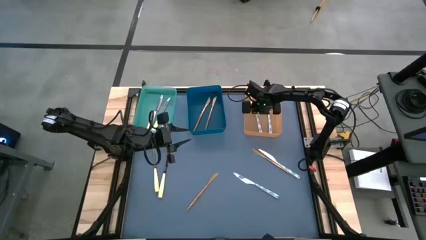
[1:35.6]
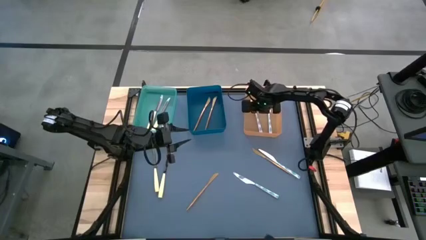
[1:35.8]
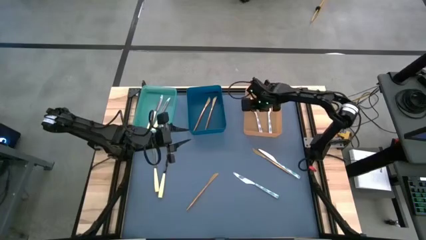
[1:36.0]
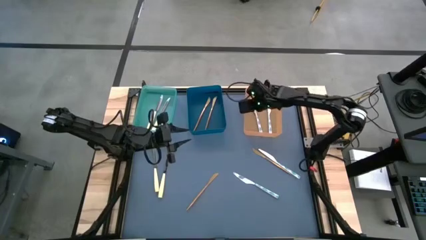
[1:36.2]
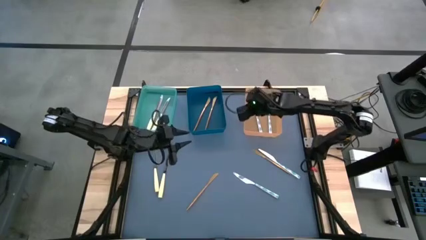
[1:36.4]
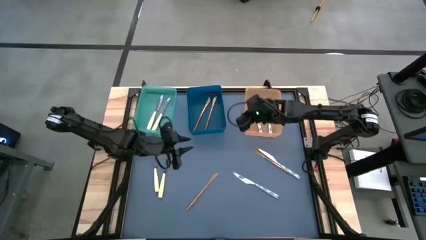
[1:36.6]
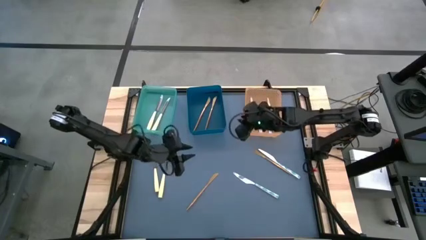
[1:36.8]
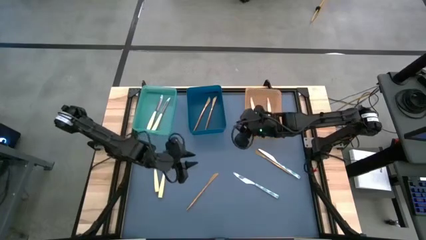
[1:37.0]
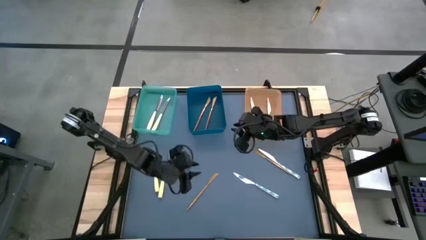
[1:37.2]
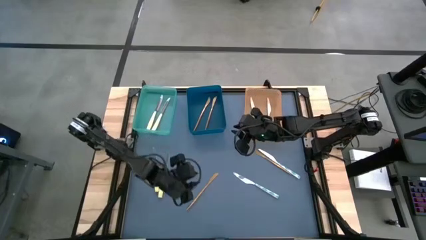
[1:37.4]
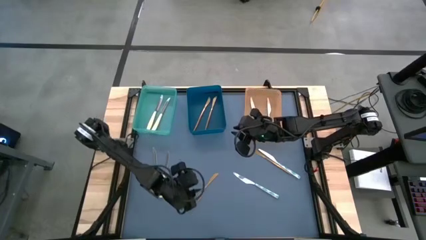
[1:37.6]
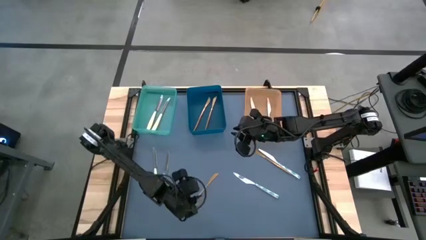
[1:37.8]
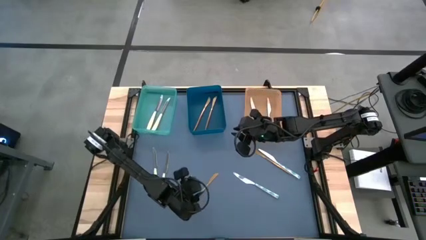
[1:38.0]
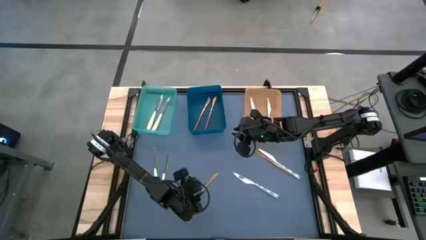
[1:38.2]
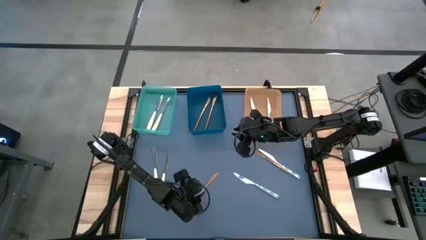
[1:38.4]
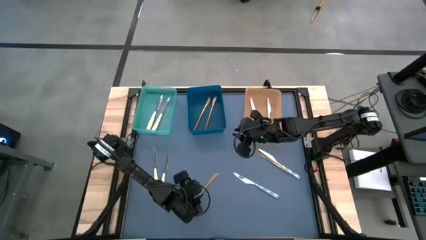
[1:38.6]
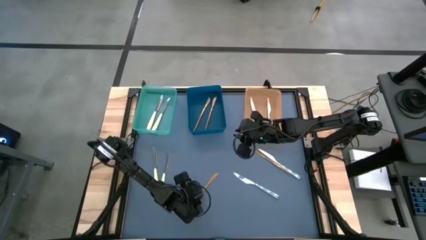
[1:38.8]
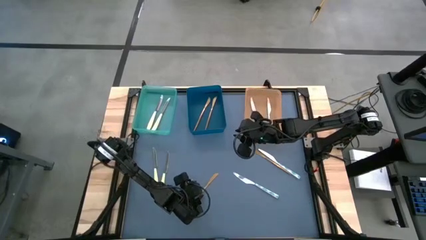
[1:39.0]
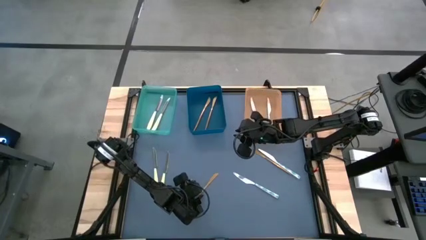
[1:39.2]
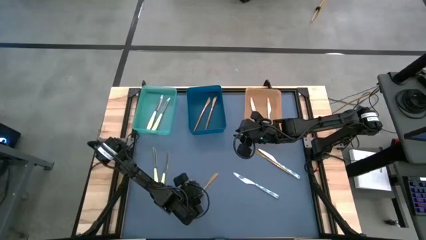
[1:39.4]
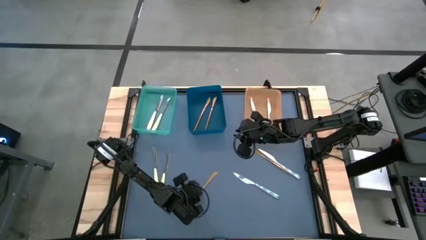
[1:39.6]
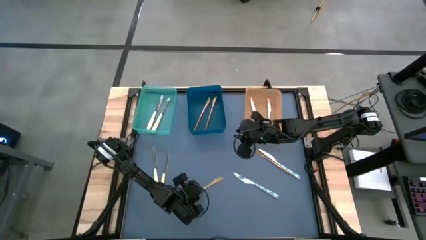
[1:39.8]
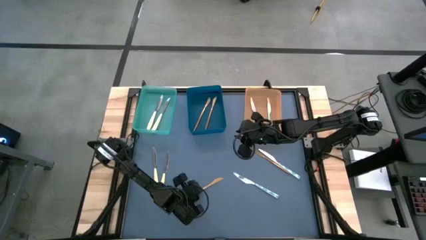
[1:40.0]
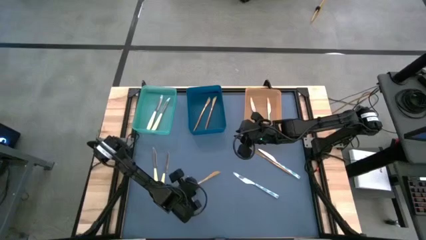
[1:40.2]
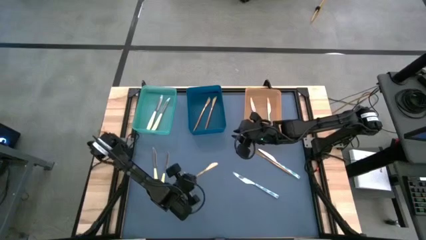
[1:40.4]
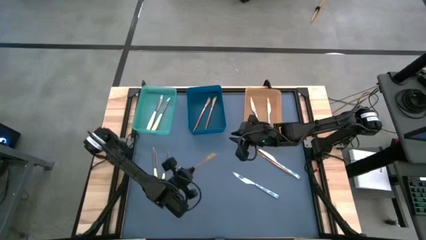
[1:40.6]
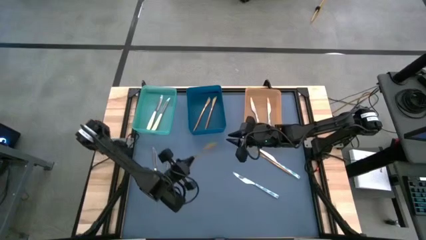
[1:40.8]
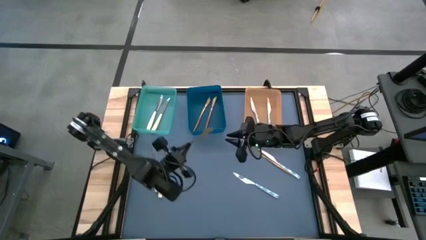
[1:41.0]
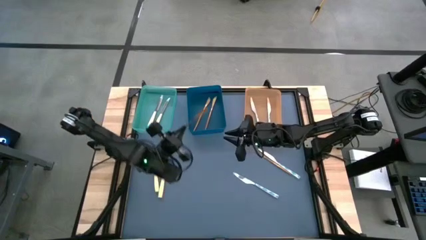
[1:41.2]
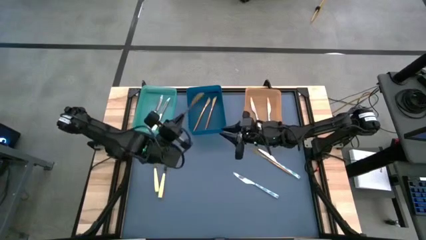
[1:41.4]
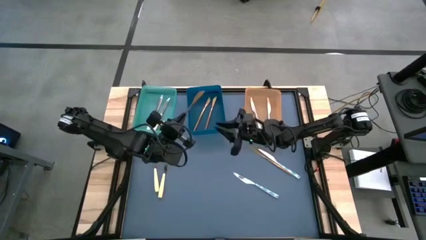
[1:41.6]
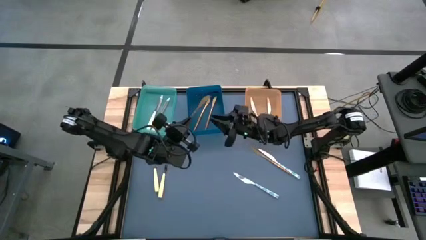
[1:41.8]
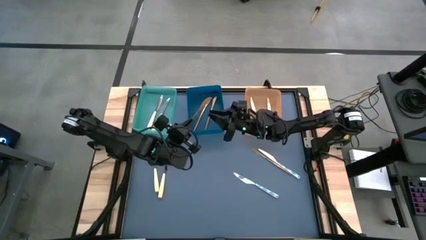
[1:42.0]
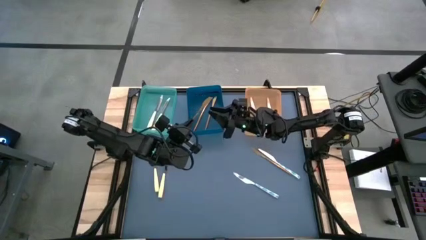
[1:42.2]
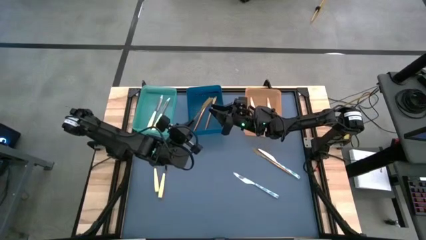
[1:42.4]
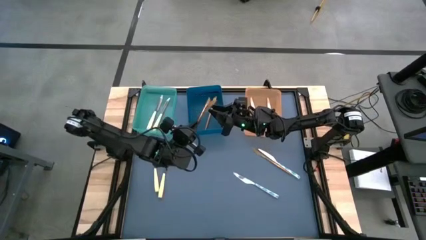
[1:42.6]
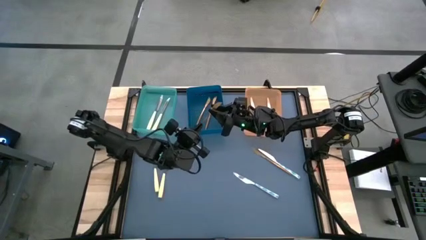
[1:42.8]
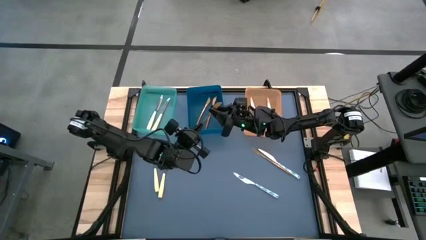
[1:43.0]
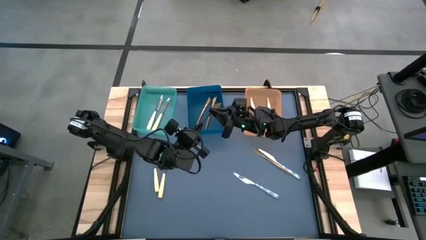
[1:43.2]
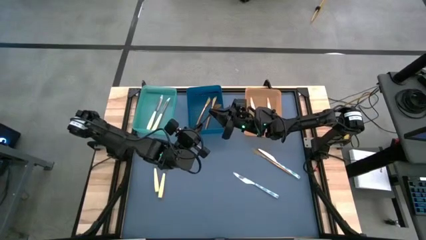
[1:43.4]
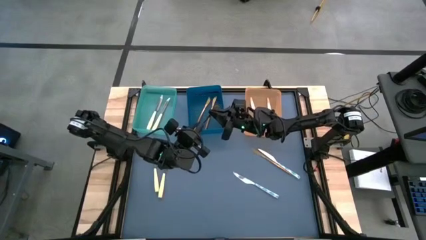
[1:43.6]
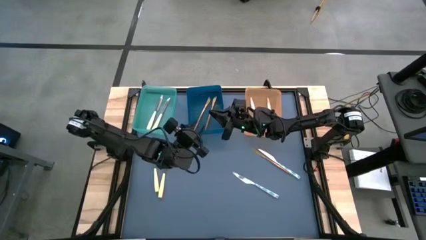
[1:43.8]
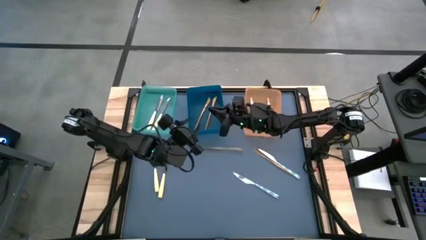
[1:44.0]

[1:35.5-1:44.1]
Task: Sort silverware by color (type)
Put the gold table knife into the blue bin

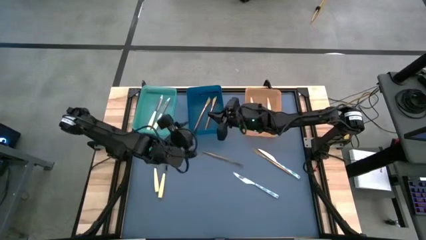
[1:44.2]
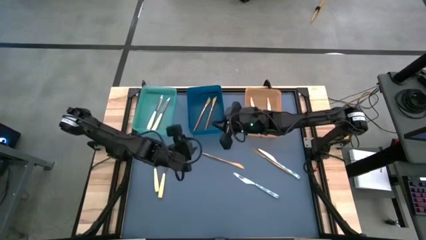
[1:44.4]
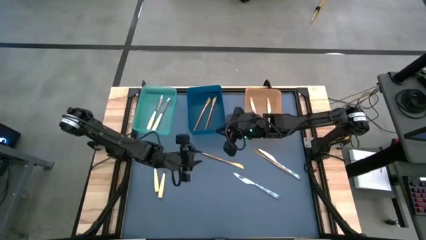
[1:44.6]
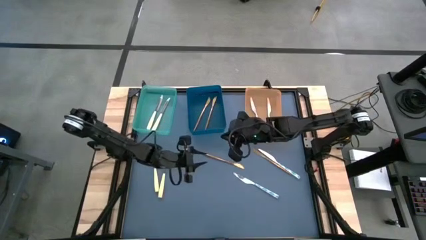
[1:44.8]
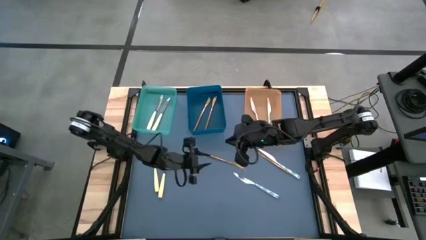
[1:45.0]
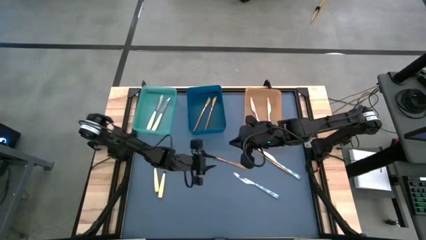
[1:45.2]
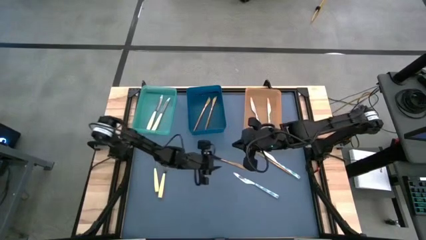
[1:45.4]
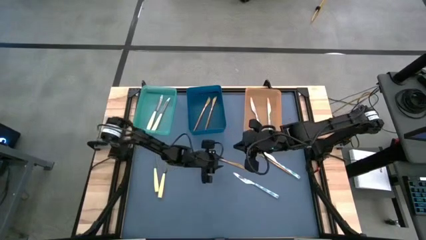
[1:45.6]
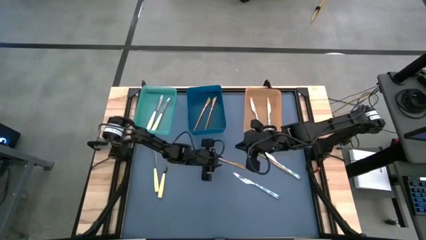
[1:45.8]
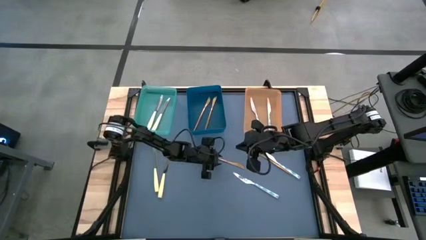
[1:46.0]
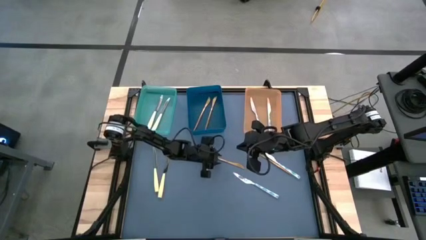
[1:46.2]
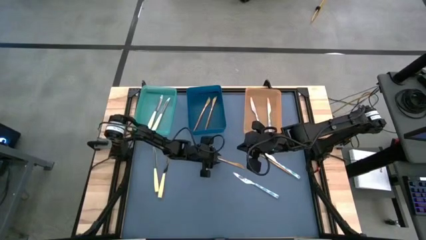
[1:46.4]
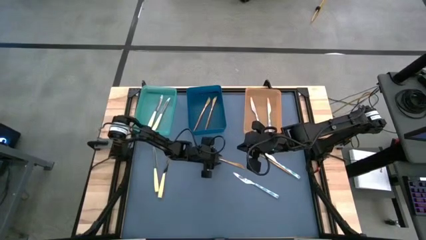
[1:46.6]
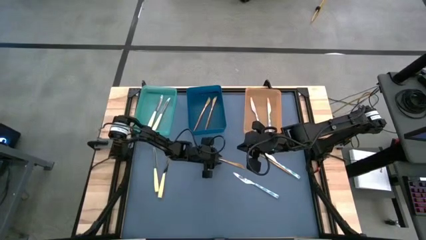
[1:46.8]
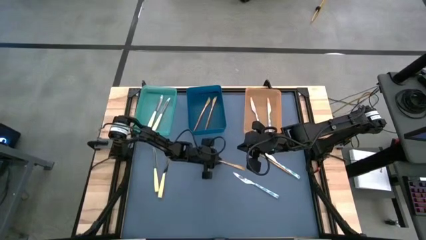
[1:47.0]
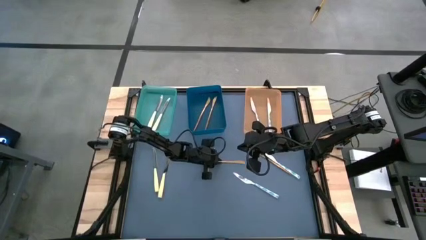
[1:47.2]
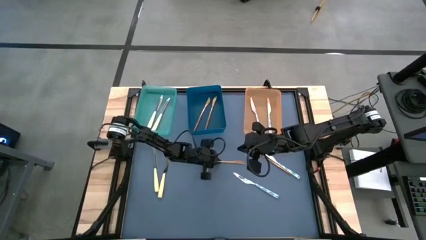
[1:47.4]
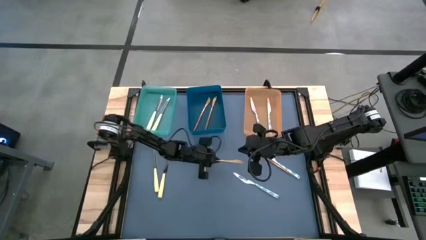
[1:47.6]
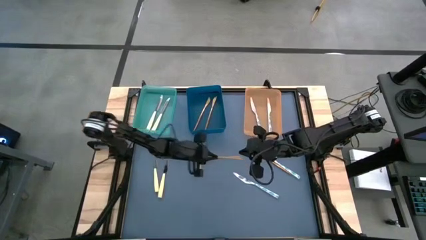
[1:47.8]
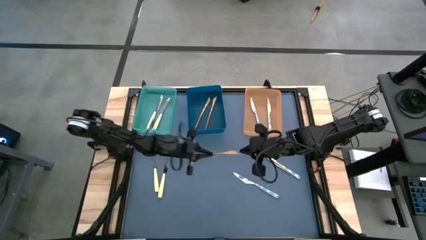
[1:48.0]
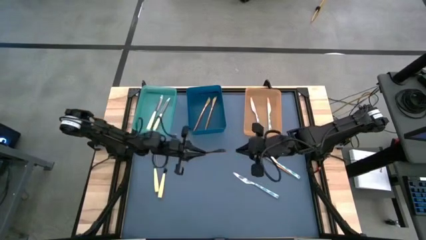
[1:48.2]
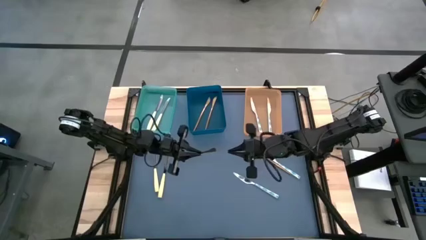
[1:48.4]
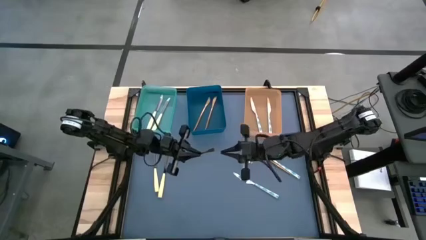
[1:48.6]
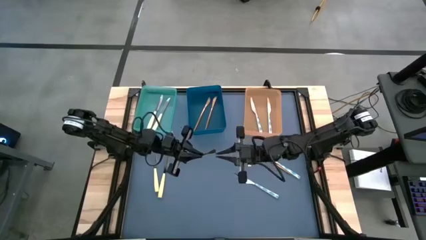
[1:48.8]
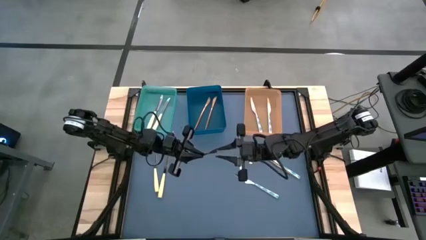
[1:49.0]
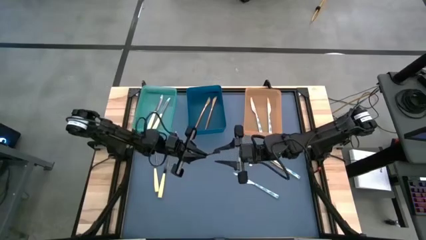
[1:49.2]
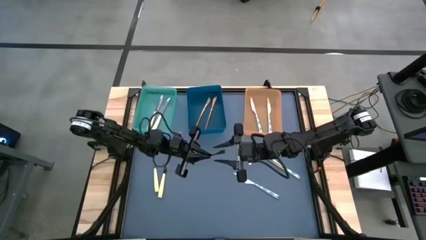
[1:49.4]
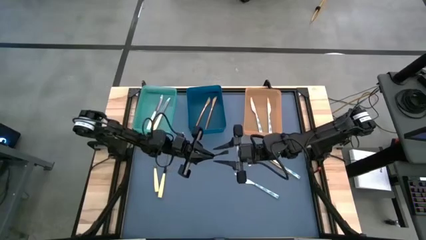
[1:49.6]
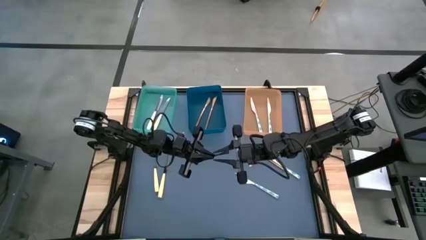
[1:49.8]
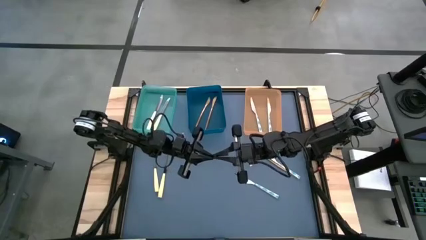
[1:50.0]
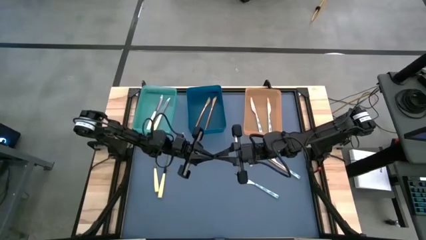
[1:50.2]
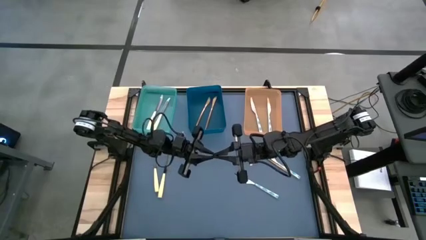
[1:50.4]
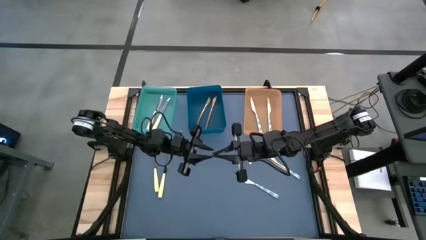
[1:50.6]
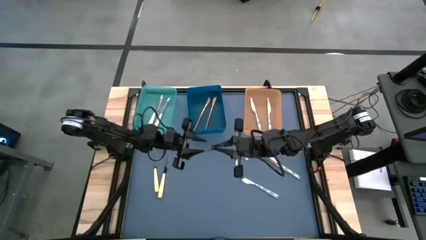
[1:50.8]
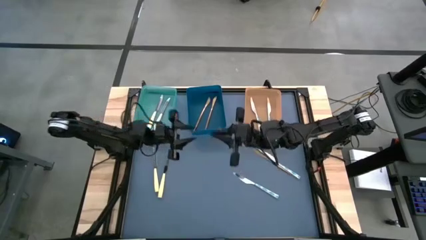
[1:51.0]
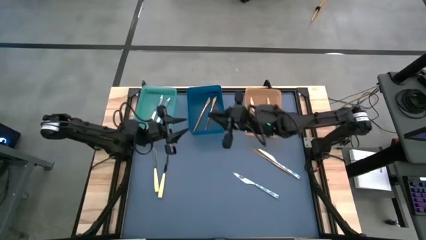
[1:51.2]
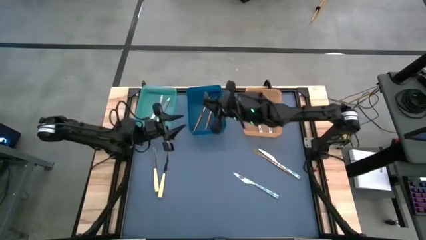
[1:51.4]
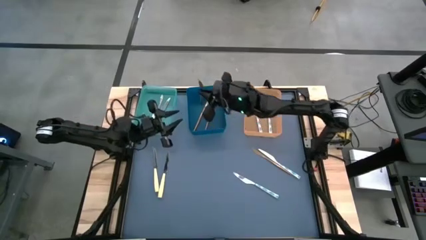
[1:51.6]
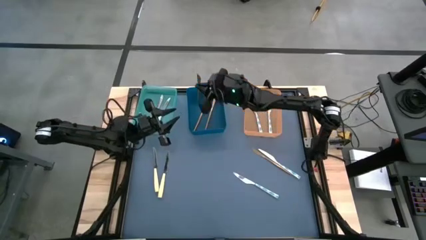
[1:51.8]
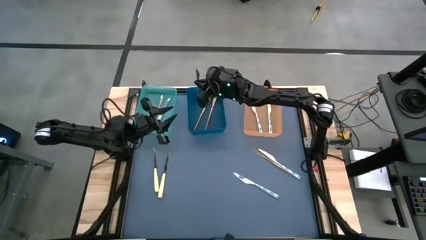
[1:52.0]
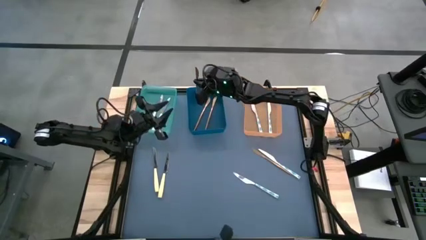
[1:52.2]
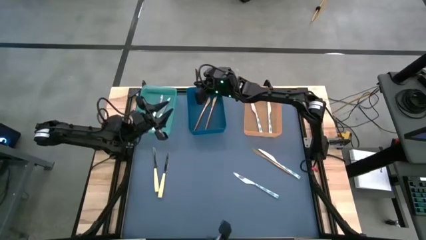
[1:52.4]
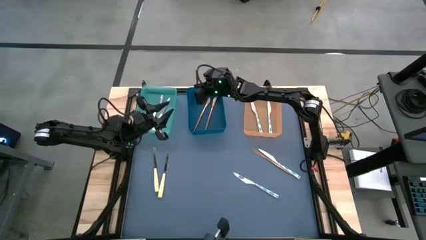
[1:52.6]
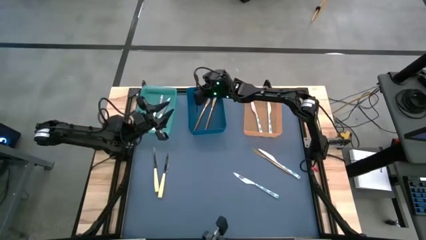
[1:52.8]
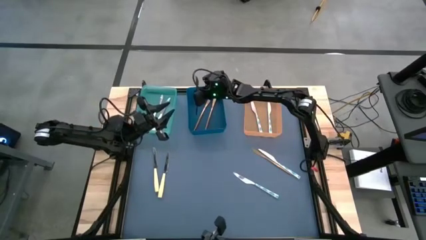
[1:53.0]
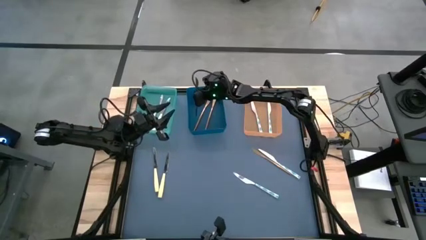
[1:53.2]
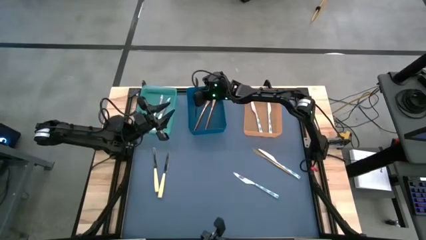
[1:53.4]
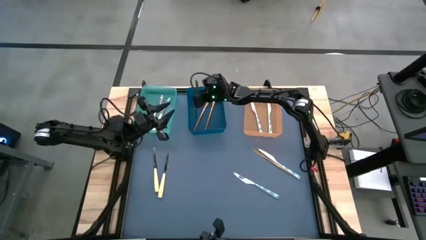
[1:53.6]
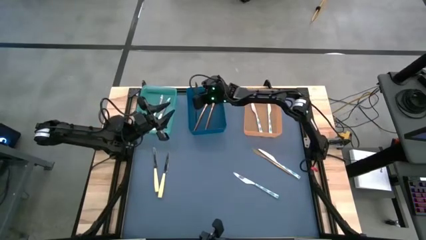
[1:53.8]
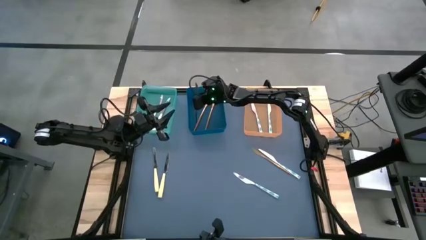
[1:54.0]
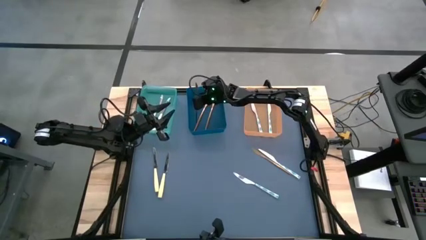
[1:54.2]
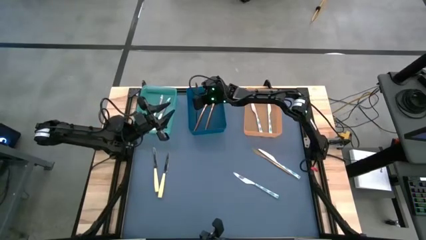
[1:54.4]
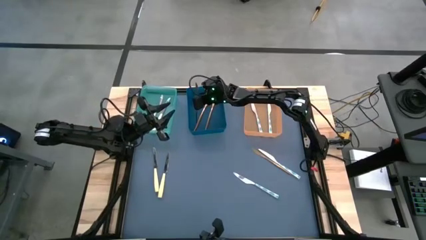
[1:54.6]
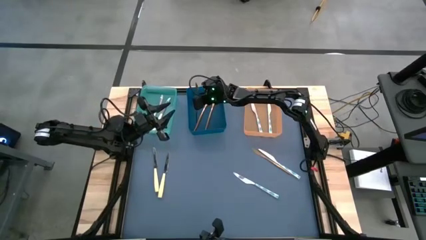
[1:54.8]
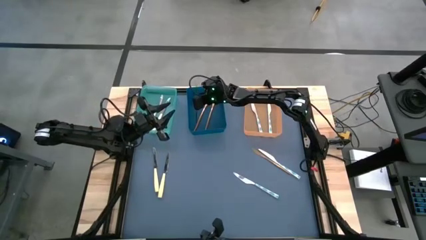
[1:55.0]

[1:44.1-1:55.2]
Put the gold table knife into the blue bin
